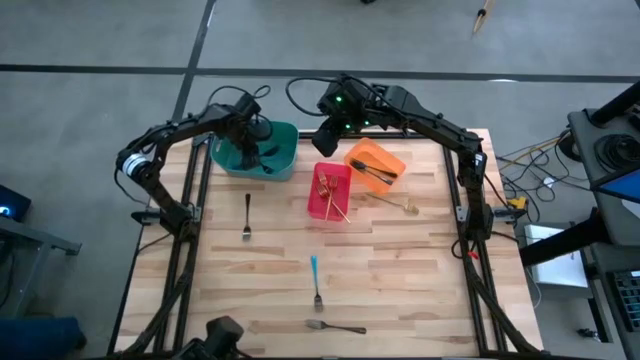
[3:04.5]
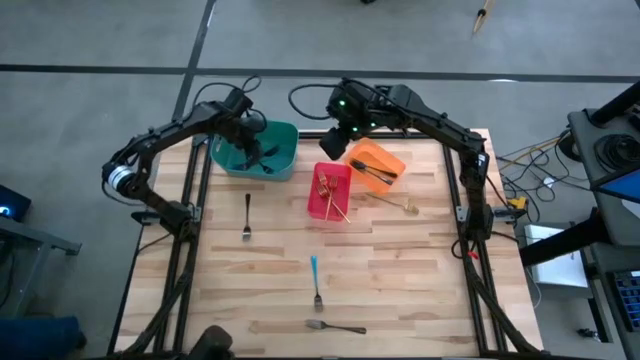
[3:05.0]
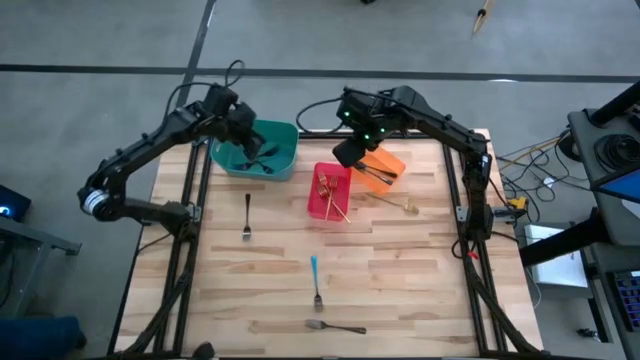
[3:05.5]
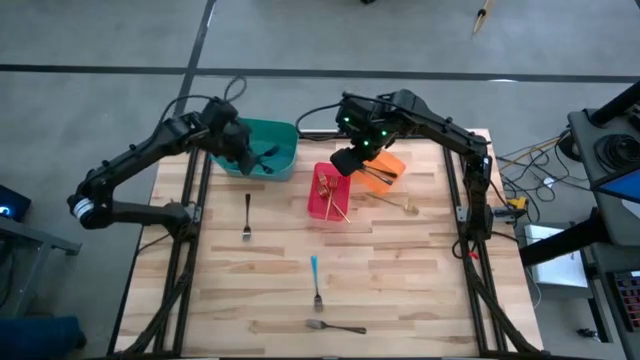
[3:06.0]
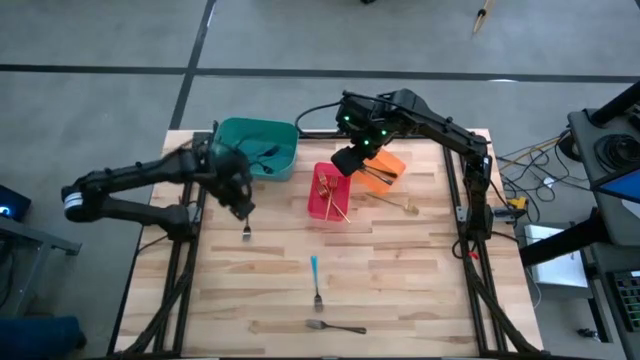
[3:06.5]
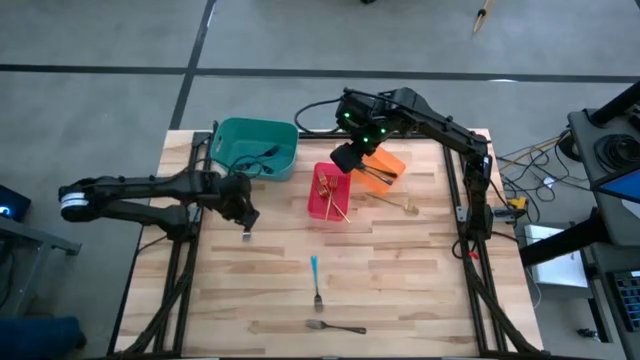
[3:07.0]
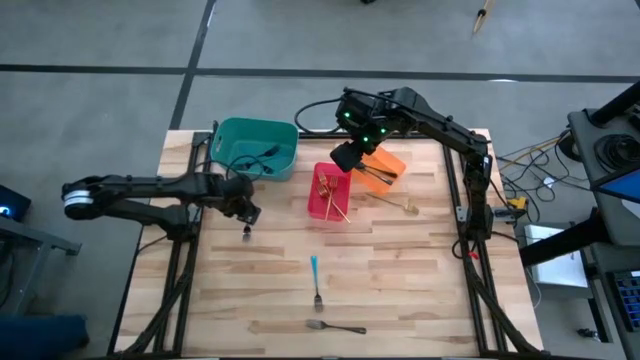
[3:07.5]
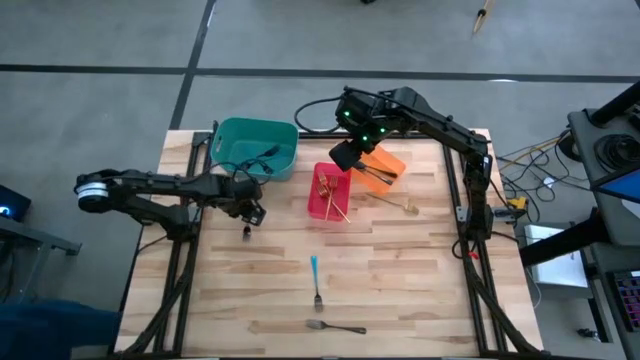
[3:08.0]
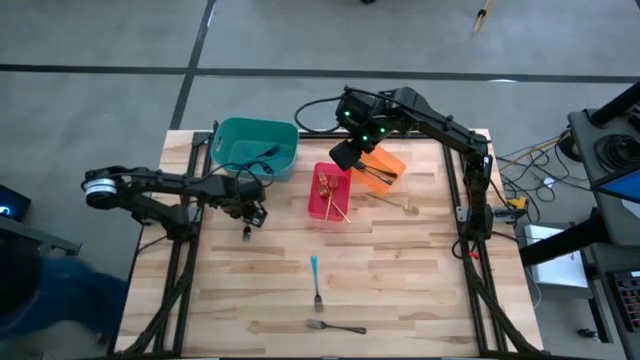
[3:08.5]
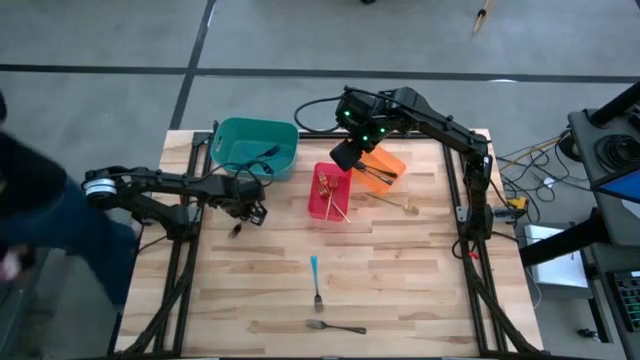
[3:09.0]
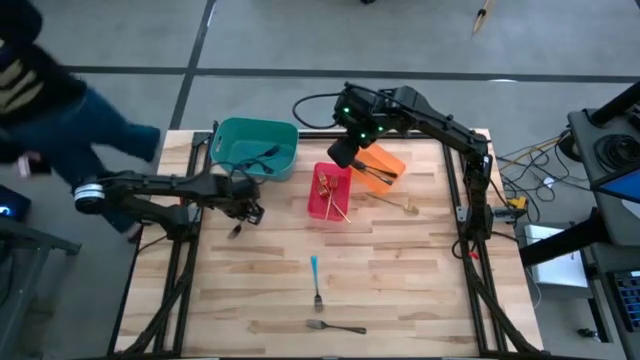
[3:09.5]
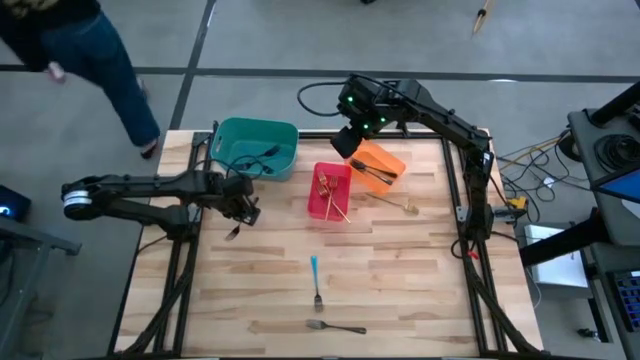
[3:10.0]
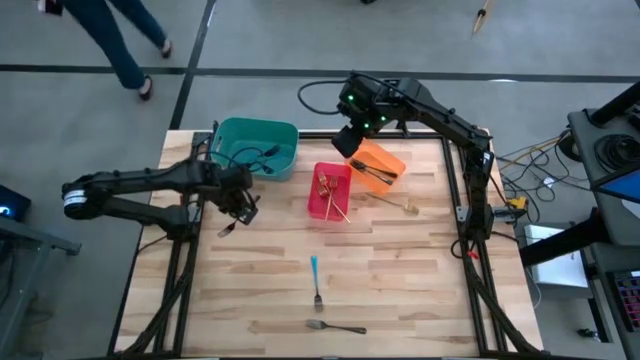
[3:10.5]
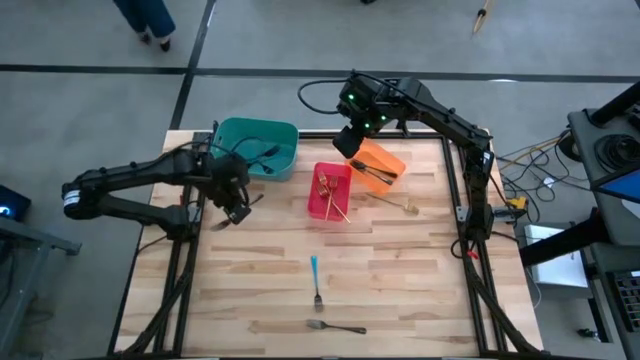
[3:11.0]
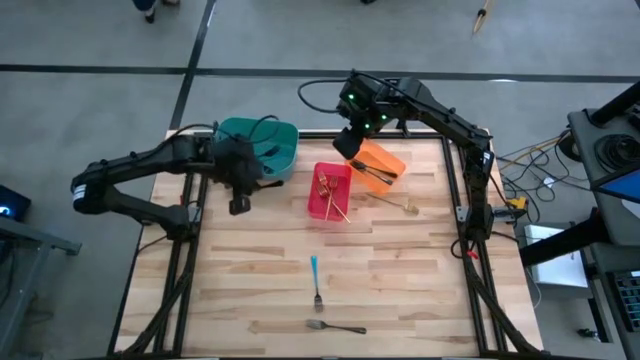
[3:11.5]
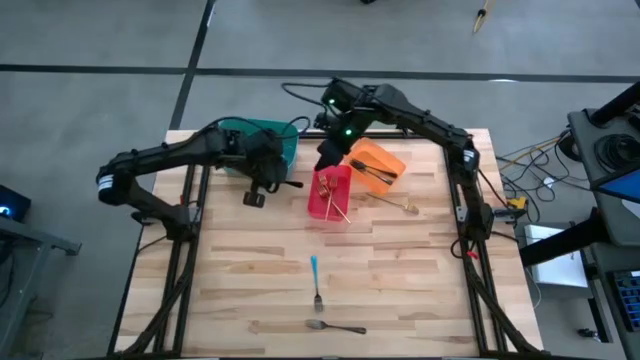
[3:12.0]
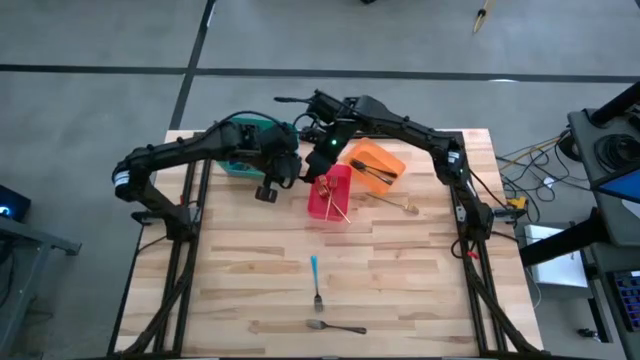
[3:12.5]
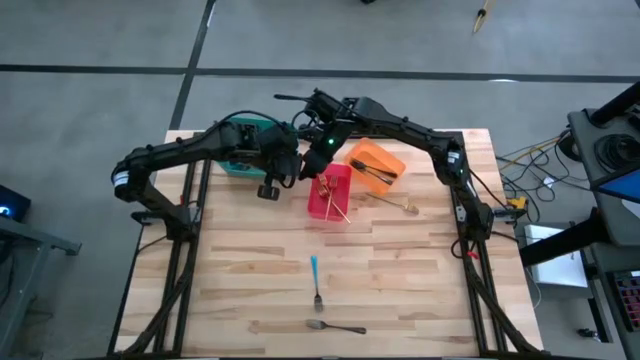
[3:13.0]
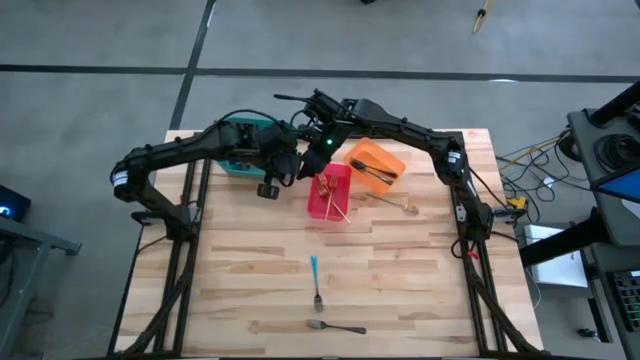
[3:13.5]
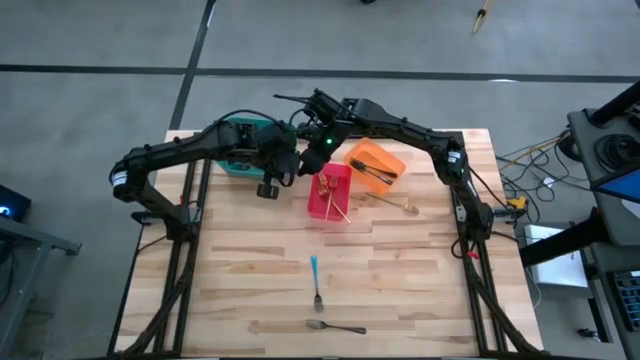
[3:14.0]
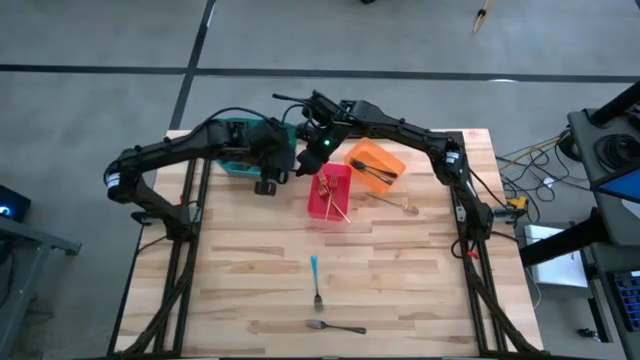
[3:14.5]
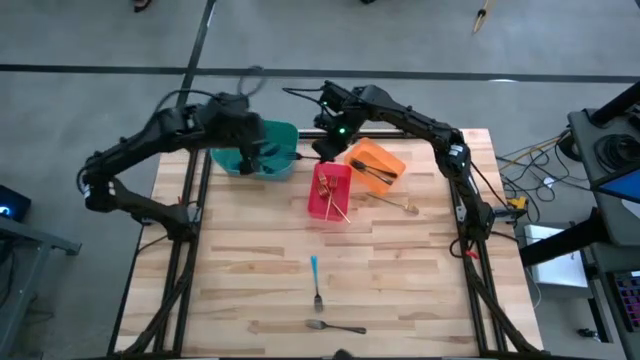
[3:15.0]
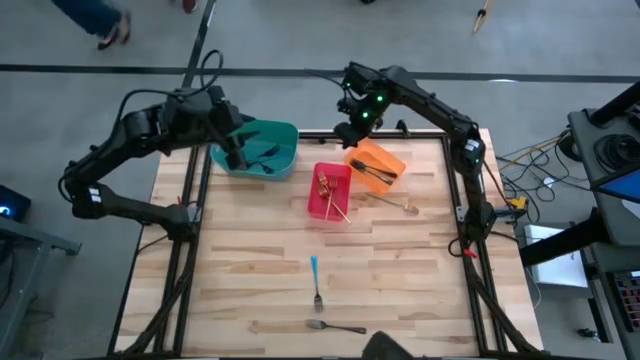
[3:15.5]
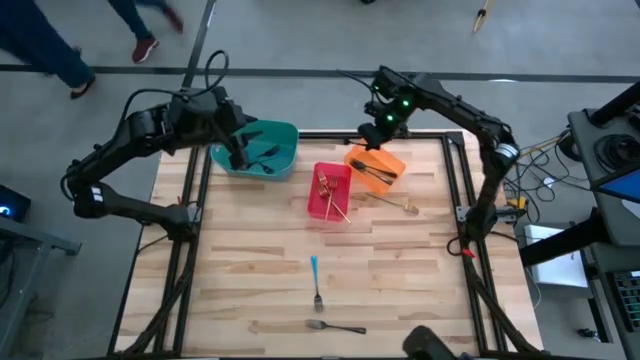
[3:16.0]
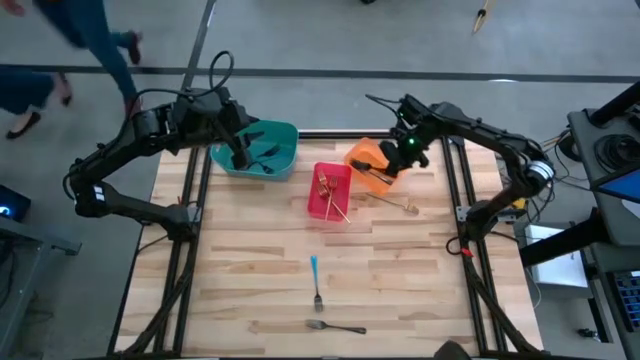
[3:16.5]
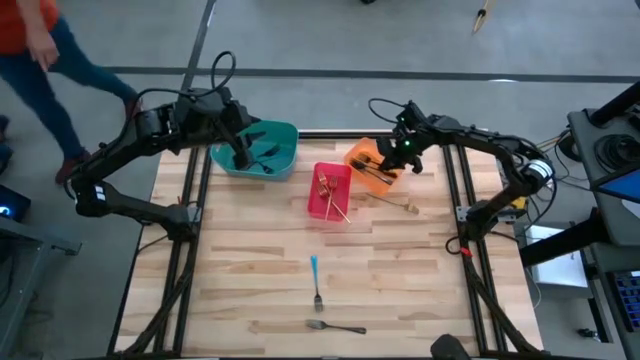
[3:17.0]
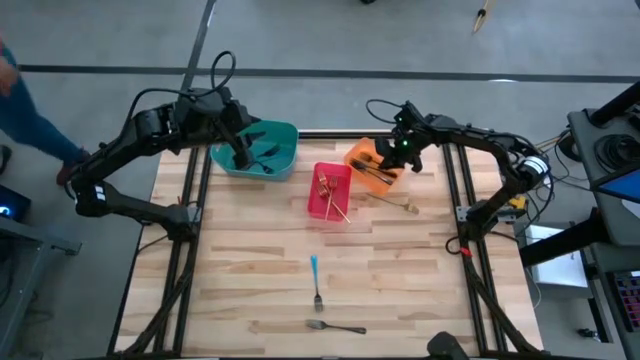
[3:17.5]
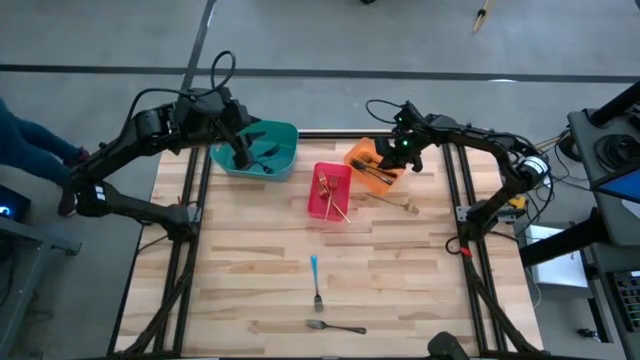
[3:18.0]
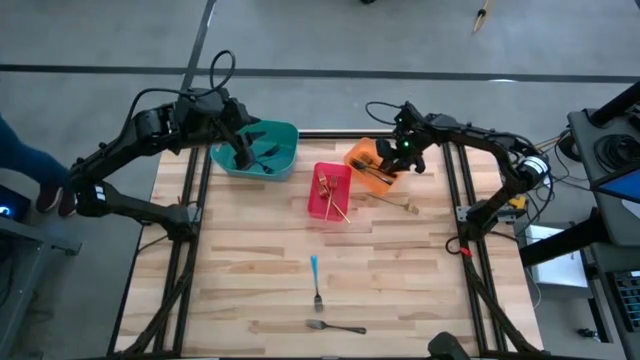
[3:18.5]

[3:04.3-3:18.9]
Task: Sort silverware by color (type)
Put the black fork into the orange bin

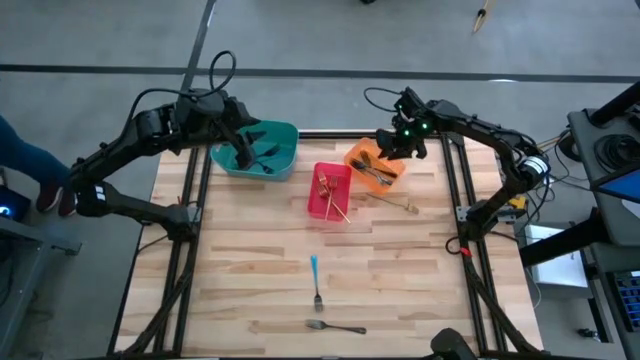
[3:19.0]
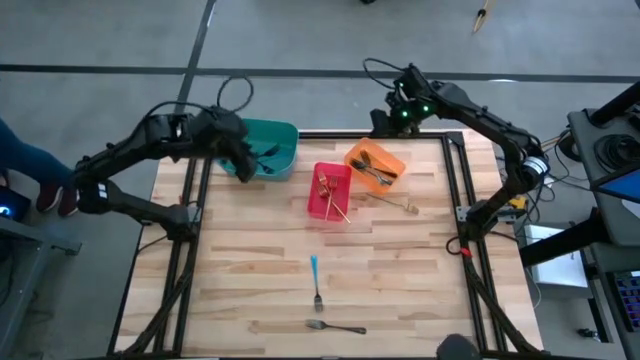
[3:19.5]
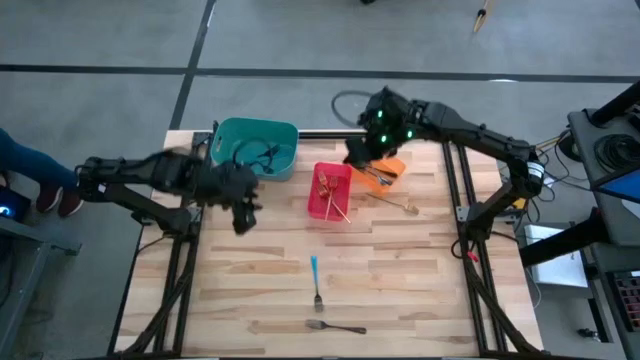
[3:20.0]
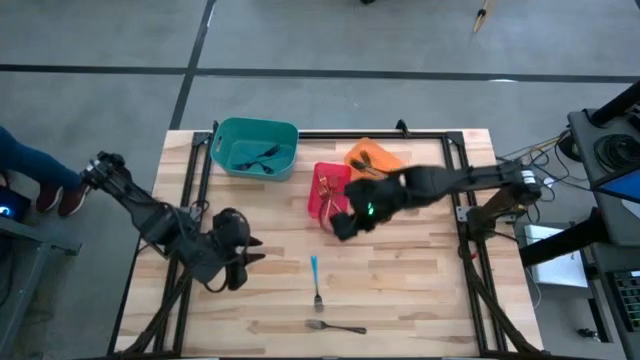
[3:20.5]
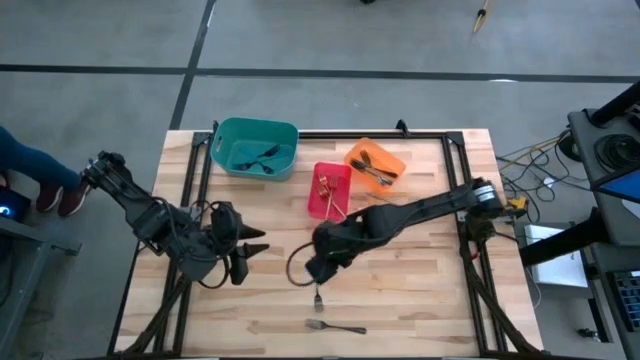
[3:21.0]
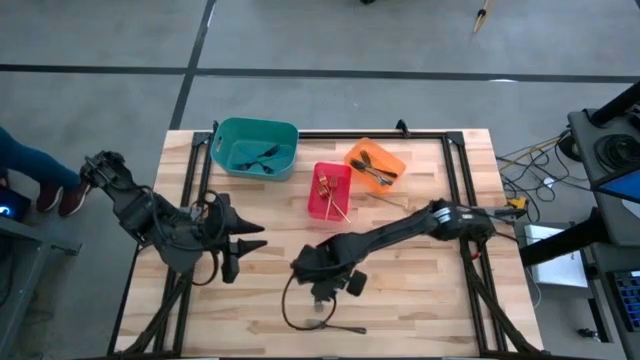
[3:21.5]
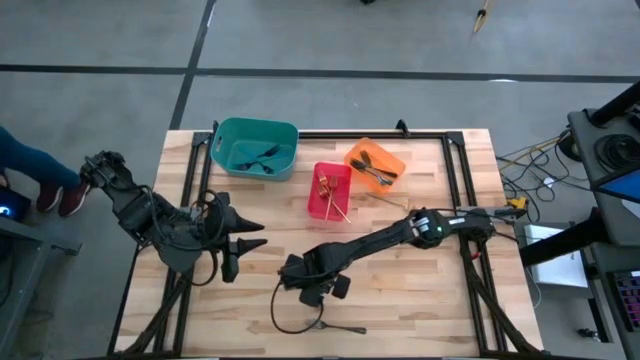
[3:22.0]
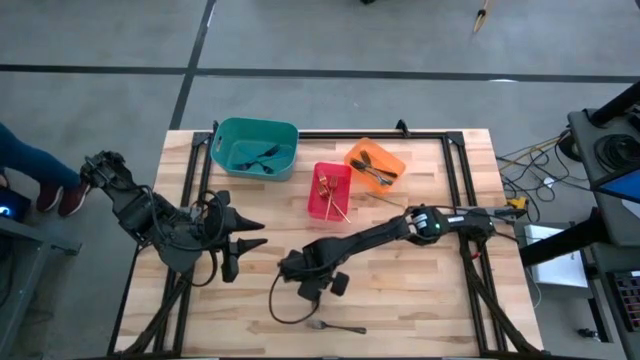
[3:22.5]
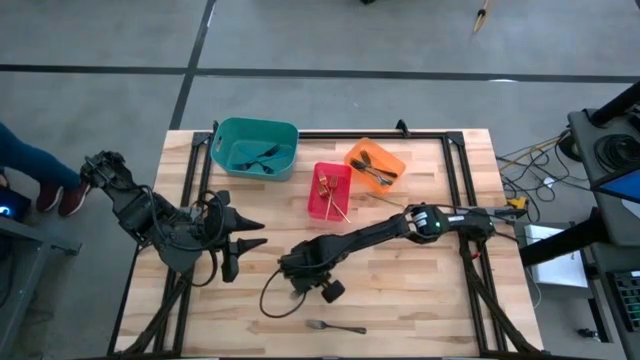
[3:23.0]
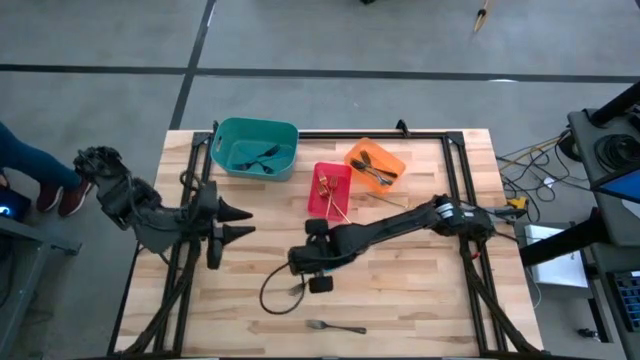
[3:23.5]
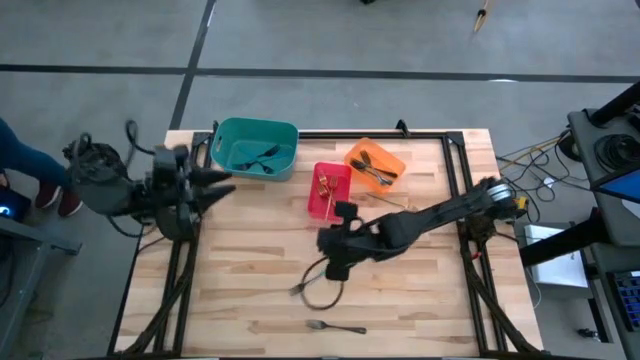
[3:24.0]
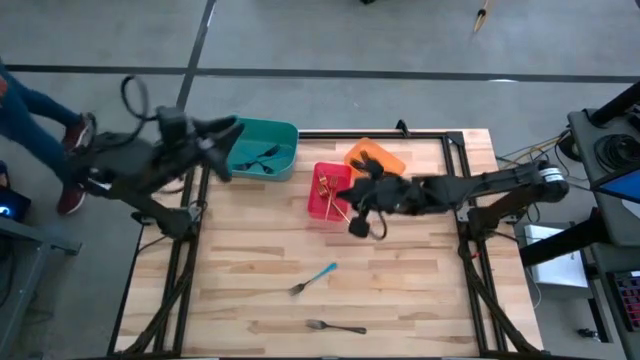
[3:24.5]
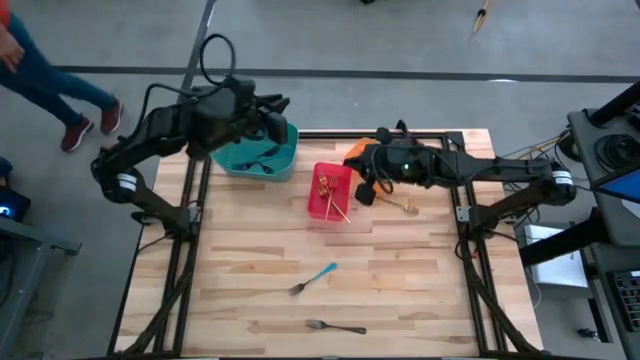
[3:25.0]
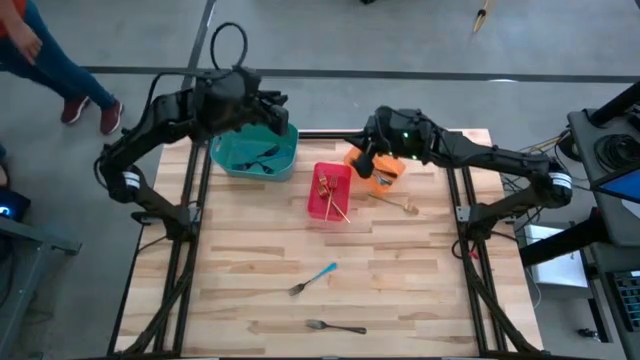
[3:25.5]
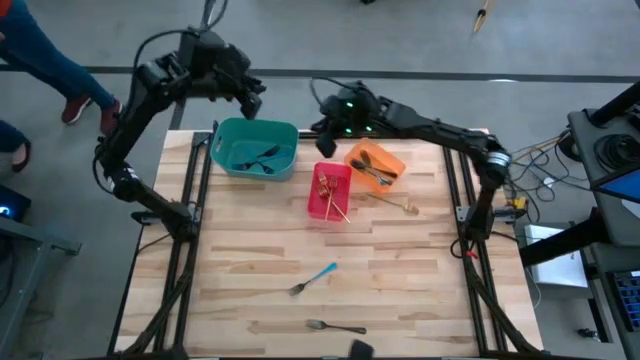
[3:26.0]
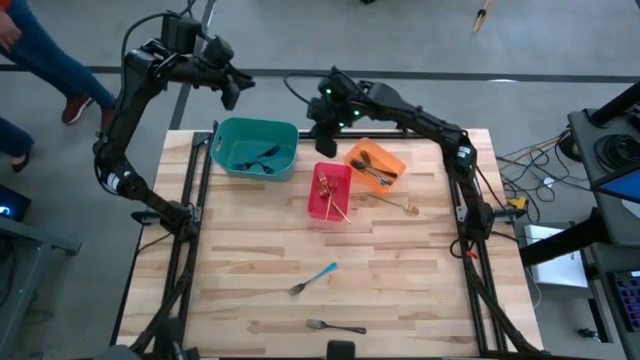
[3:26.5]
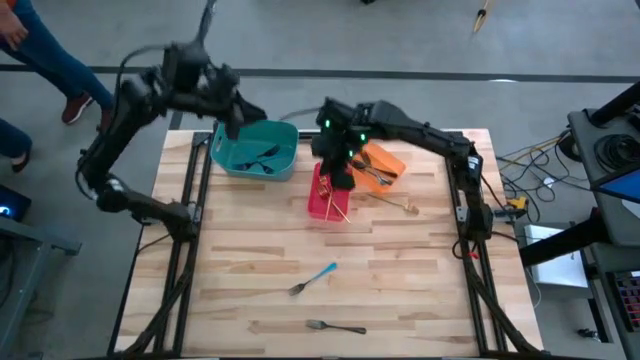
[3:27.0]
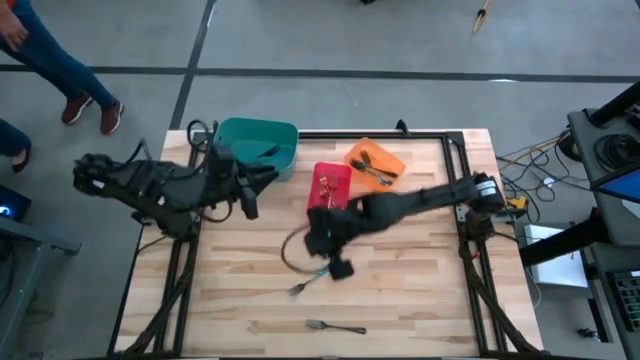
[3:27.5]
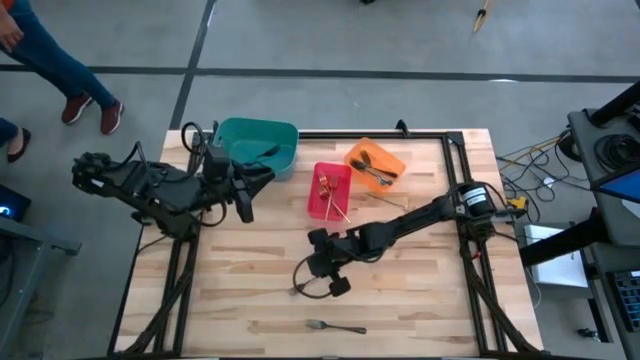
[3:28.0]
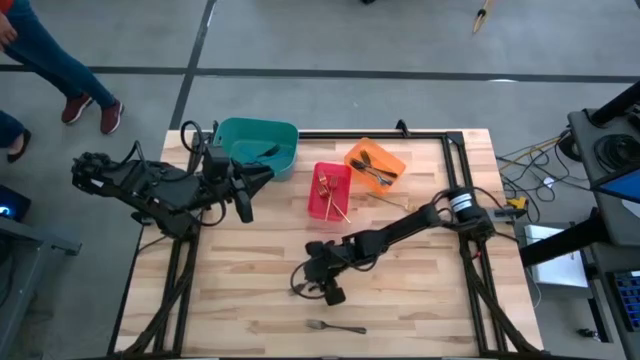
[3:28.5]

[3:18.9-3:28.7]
Put the blue fork into the green bin
